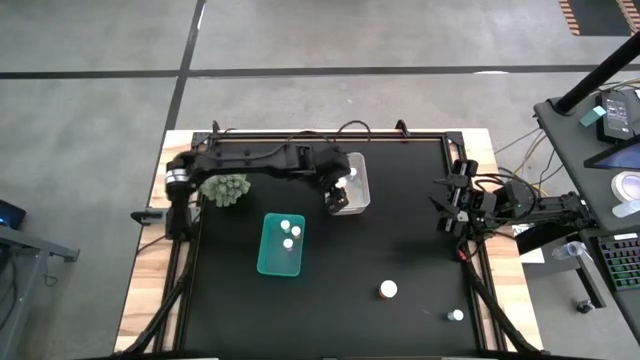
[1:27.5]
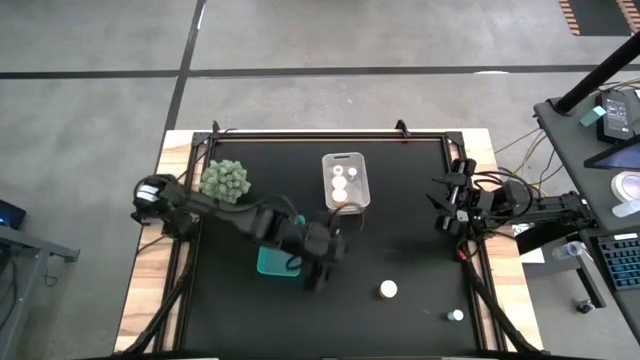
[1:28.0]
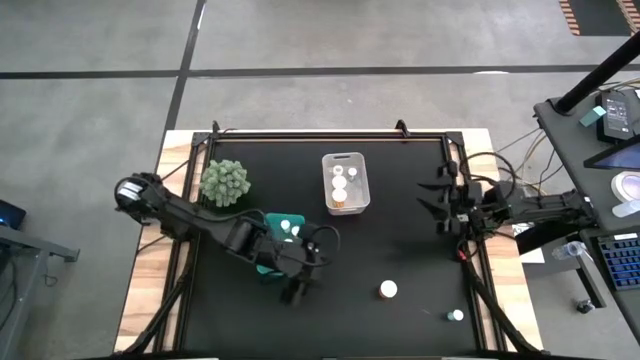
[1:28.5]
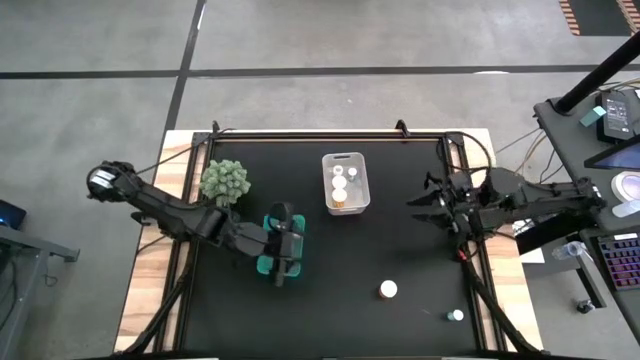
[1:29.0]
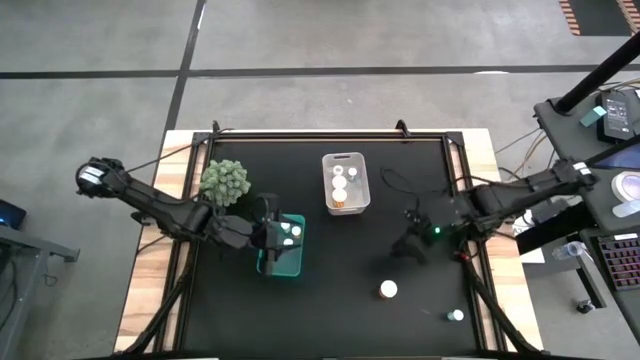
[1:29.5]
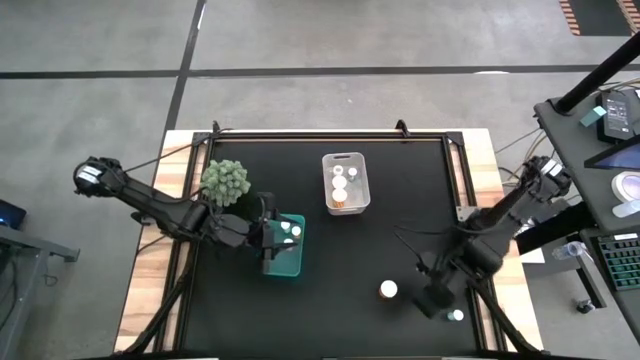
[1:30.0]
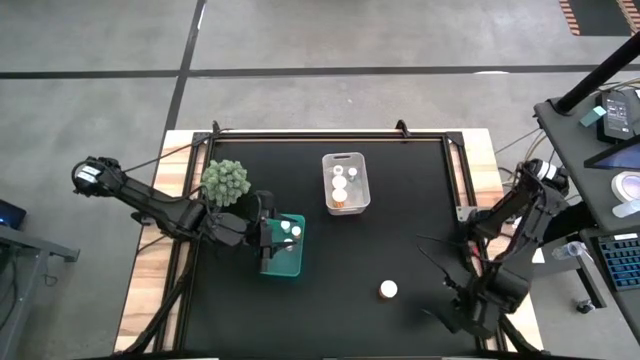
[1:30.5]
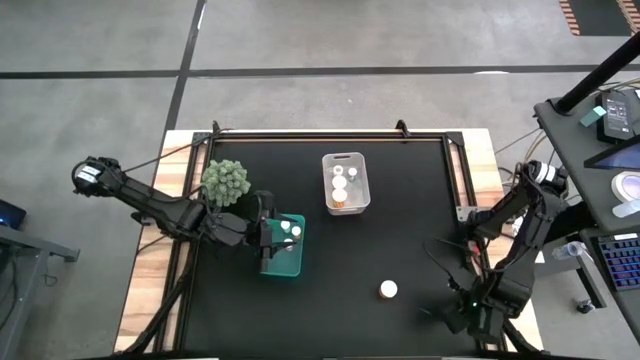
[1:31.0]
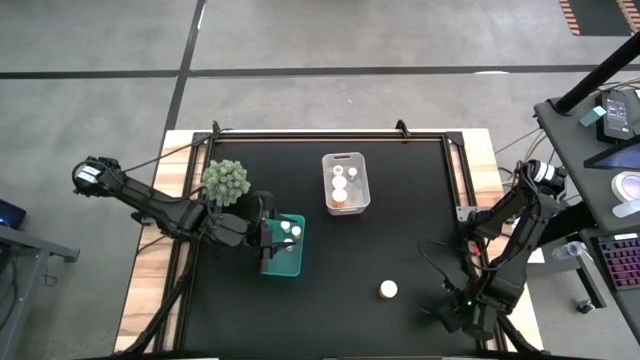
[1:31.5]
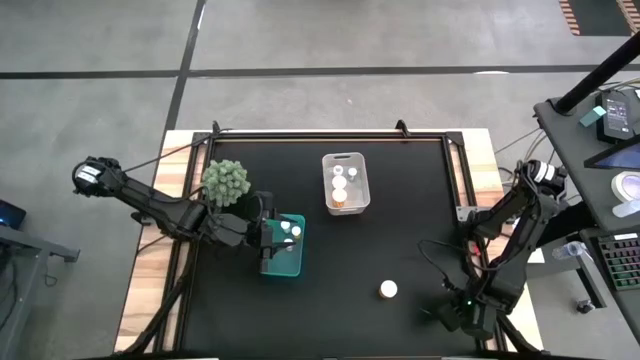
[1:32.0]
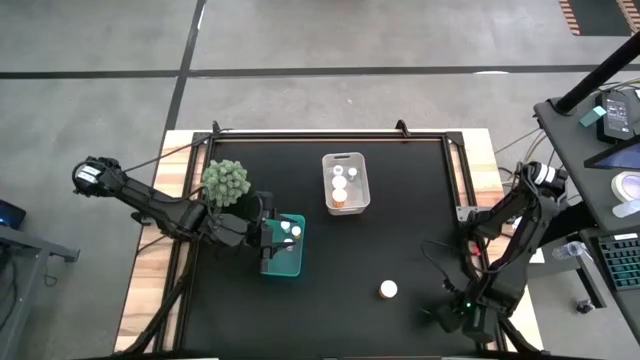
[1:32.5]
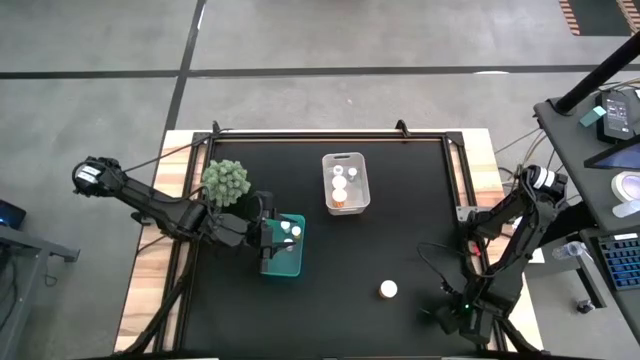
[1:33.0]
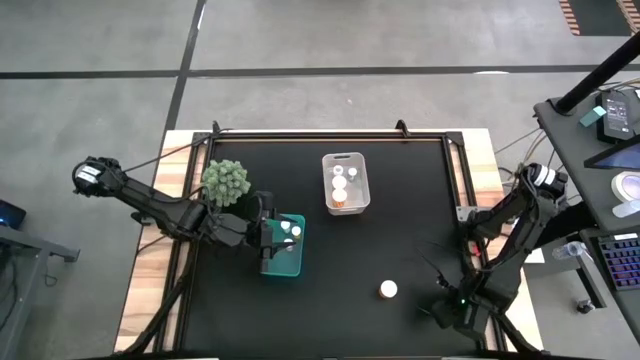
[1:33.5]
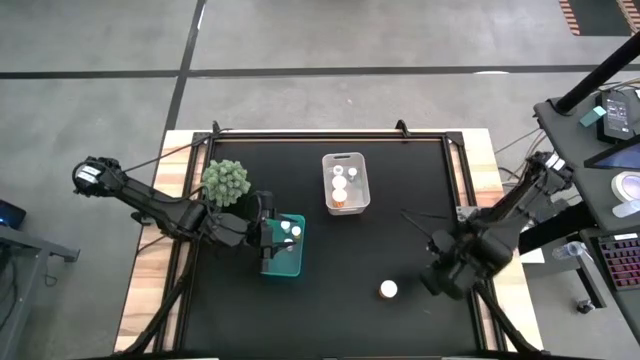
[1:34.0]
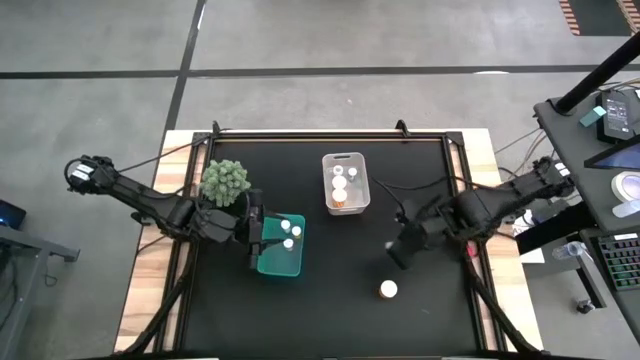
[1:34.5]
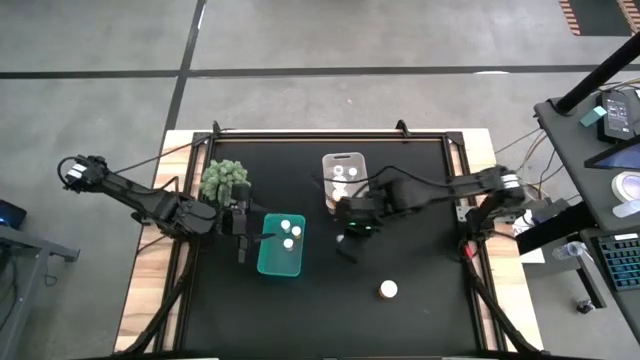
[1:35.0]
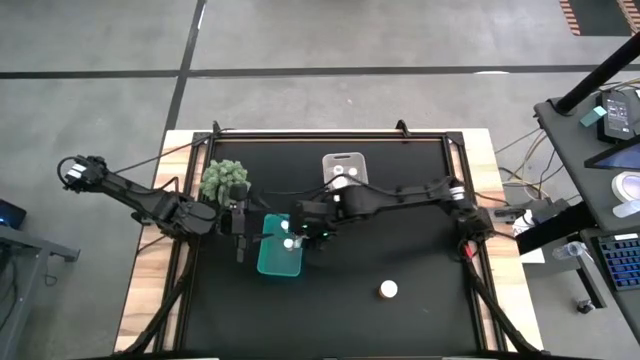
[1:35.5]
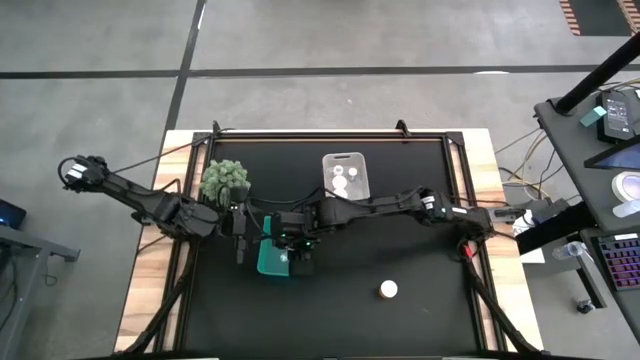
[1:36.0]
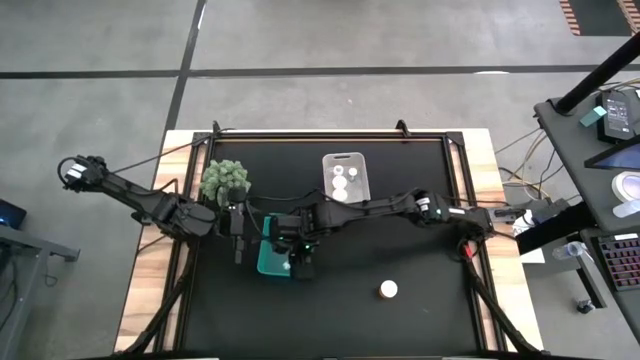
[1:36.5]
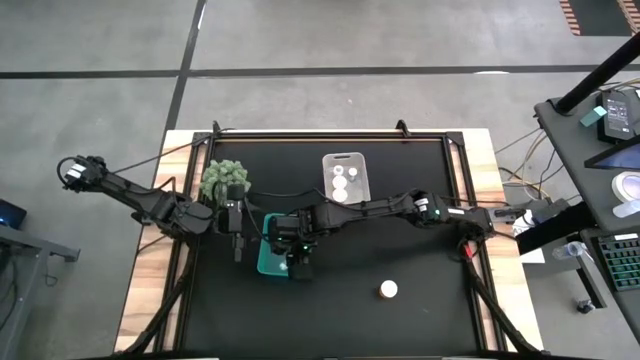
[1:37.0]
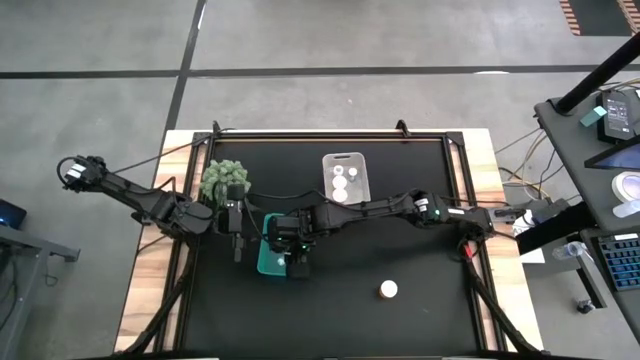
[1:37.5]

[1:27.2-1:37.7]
Task: Pick and place medicine bottles into bin by pill shape (circle, oval)
Put the blue pill bottle into the green bin

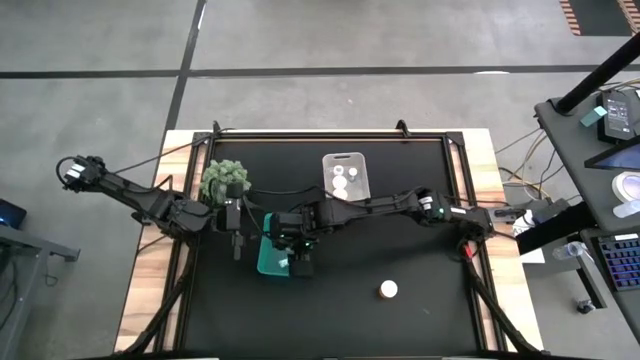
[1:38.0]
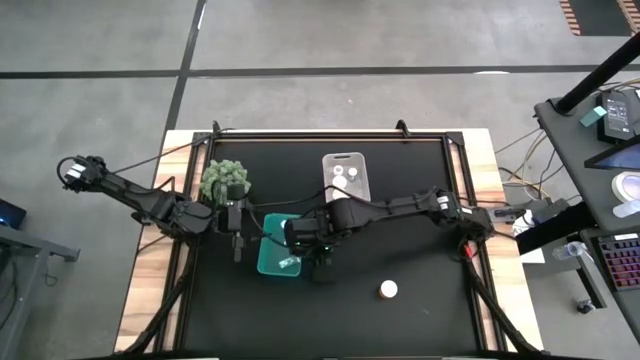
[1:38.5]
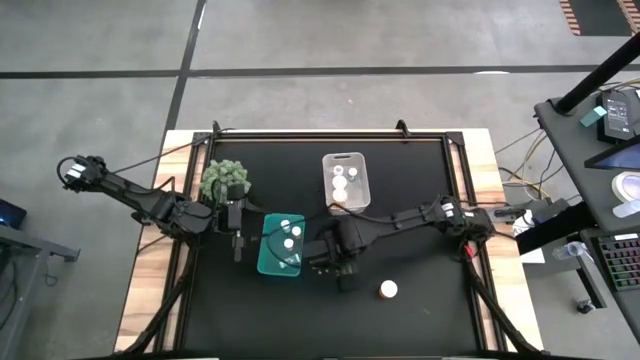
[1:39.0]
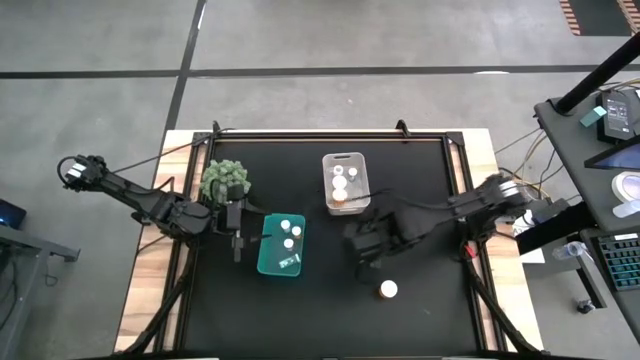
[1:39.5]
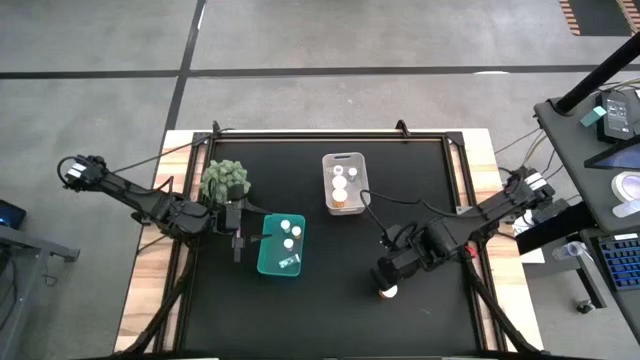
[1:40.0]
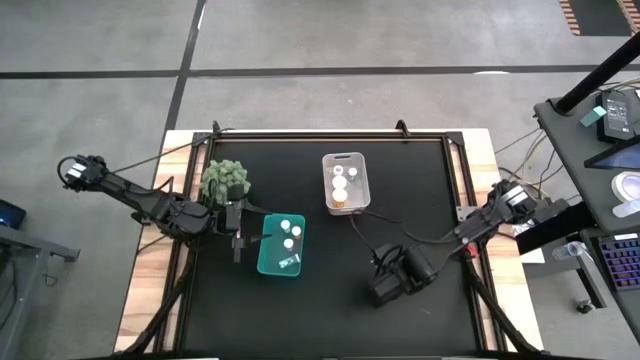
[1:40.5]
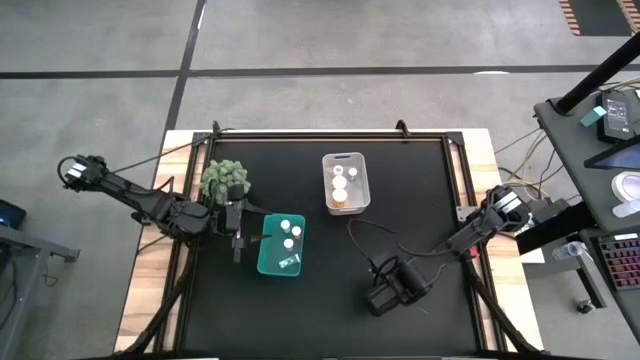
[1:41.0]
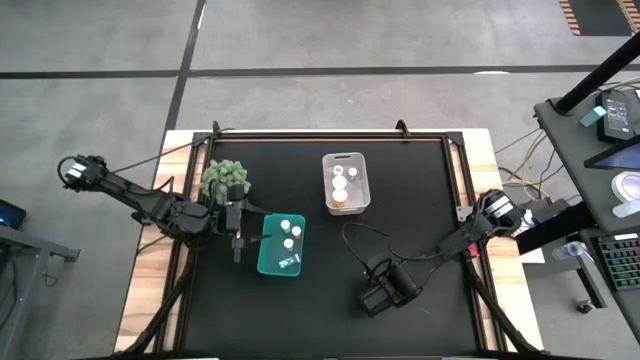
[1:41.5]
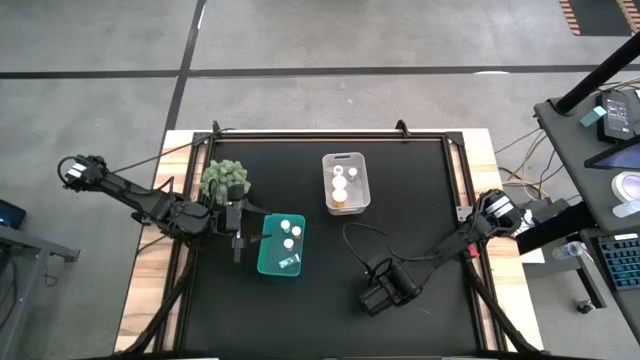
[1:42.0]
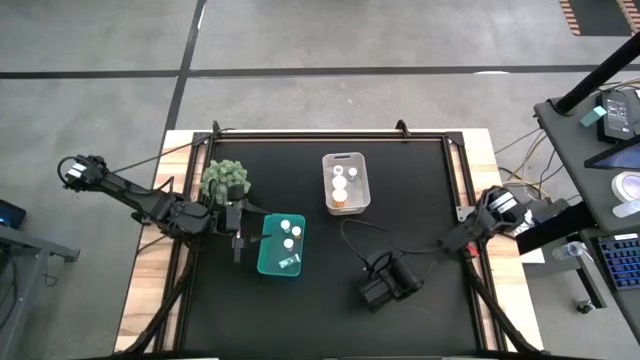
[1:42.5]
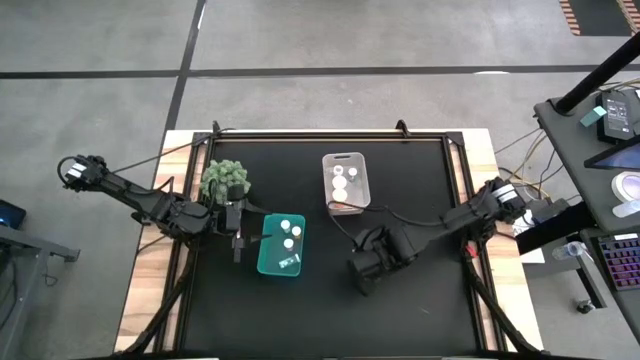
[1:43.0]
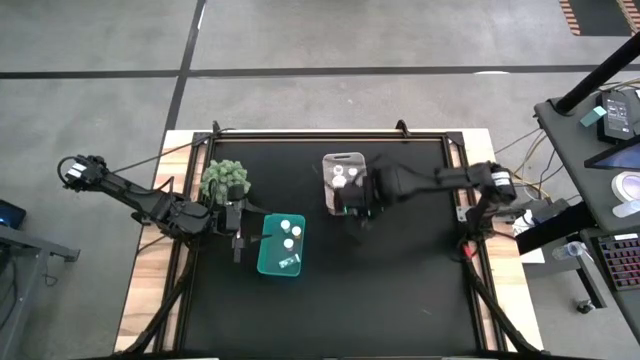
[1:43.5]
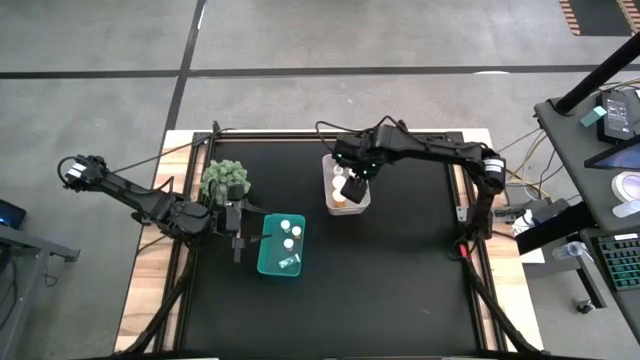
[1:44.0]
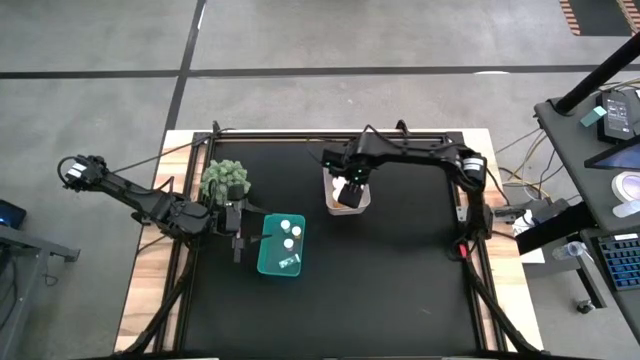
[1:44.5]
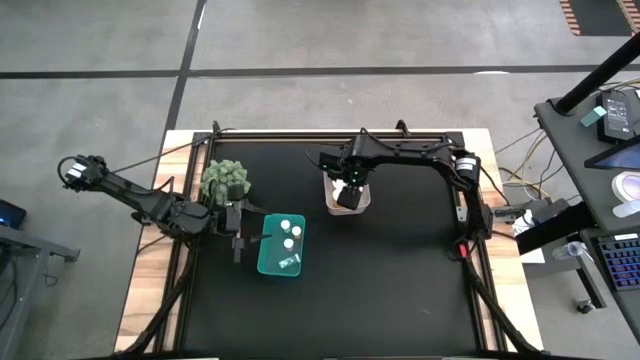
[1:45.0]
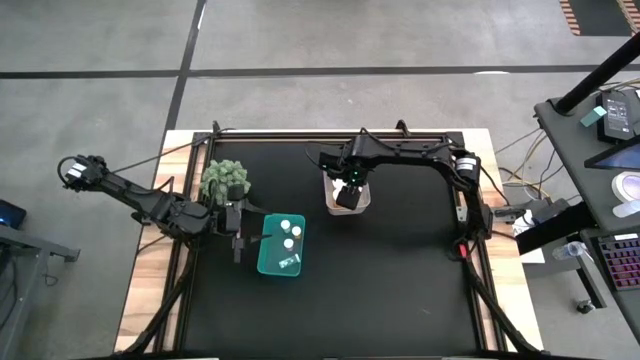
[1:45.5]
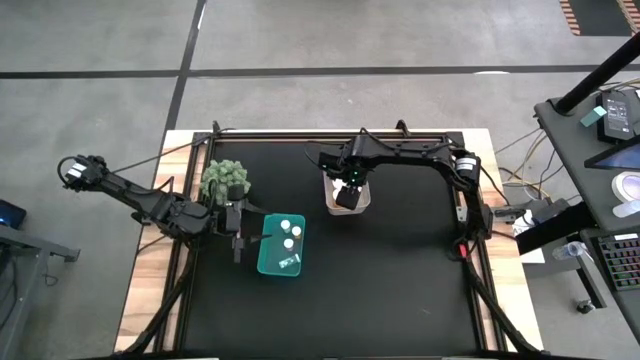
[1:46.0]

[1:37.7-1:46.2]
Put the orange pill bottle into the white bin

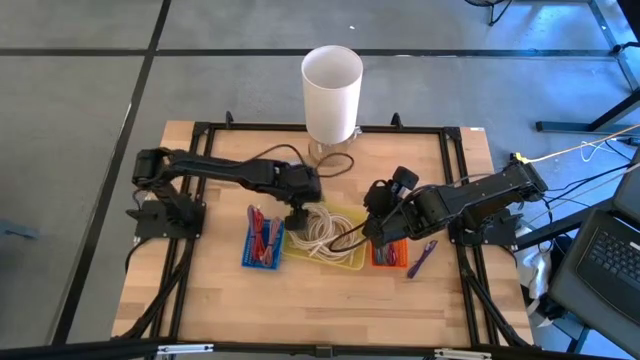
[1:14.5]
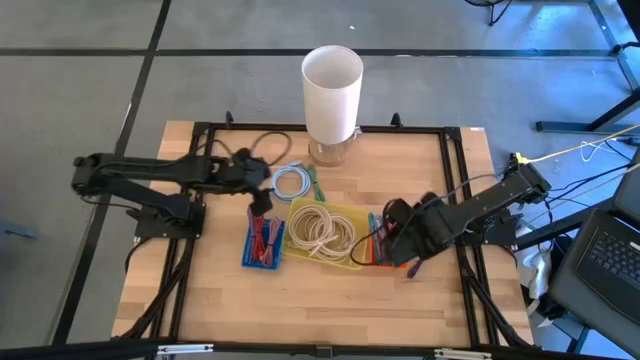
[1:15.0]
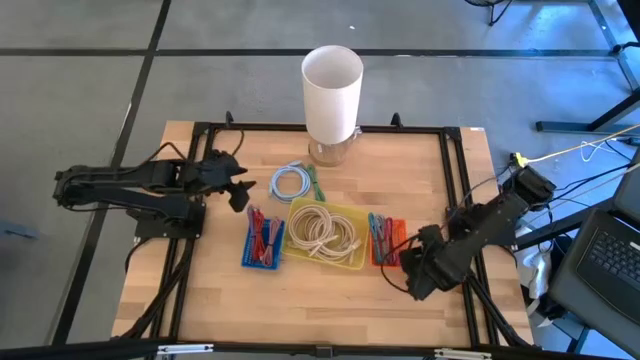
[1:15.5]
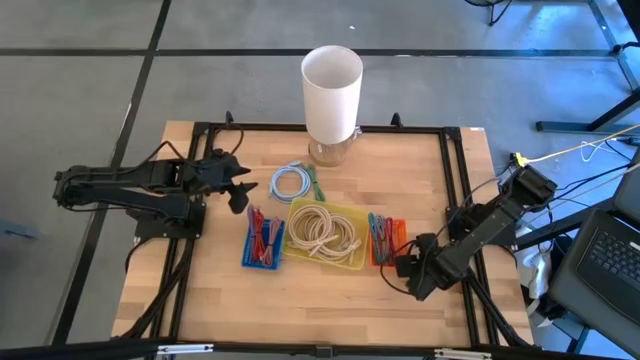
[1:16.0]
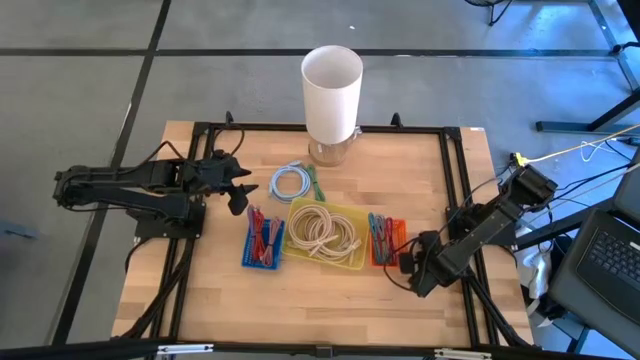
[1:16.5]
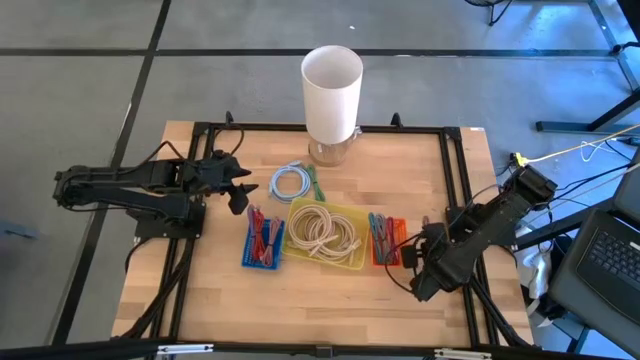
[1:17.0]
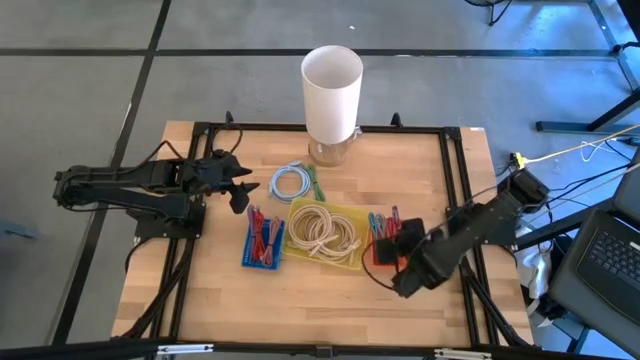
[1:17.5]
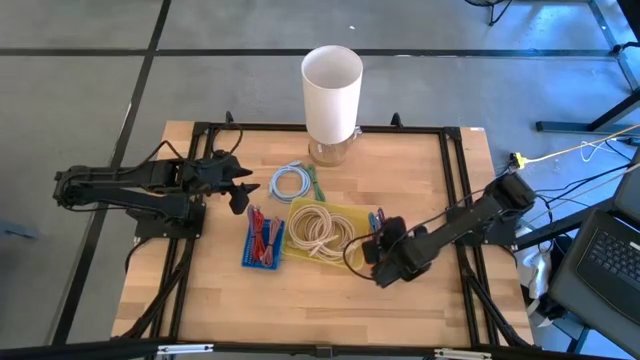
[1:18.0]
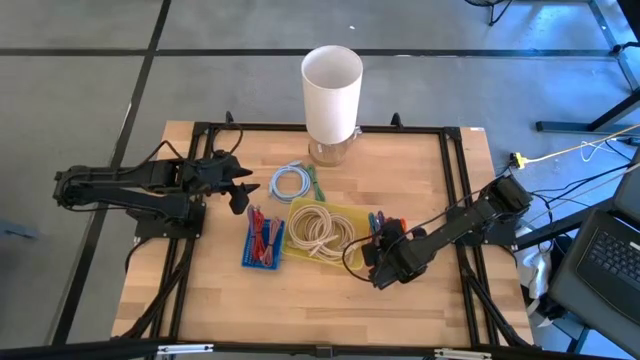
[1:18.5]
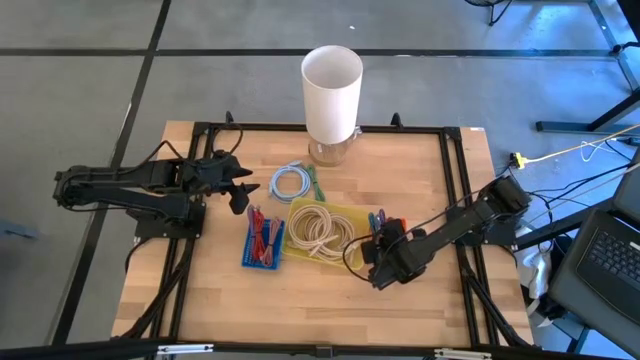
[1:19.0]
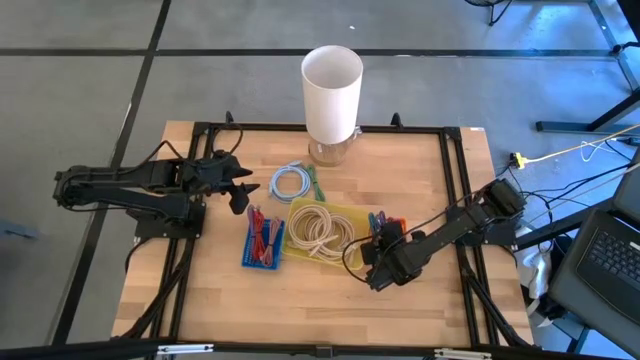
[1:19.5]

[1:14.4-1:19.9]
Task: Pick & Place USB Port
Put the purple and black charger cable into the orange bin
